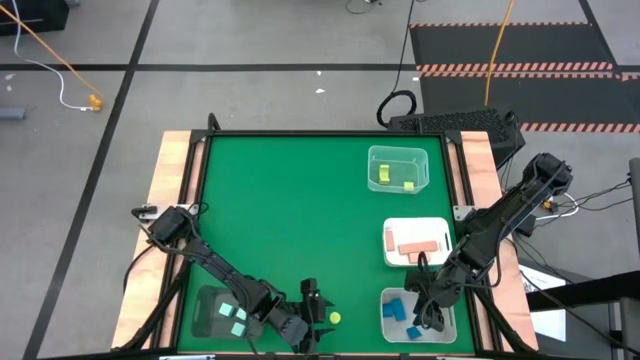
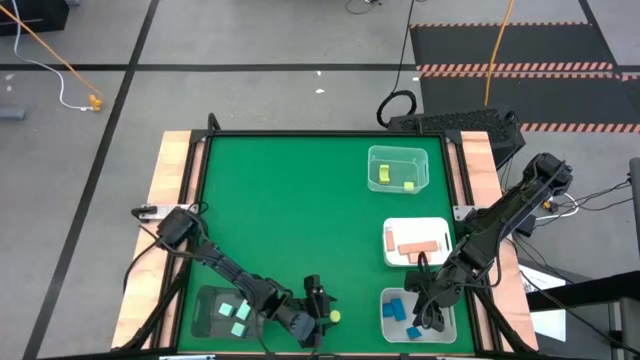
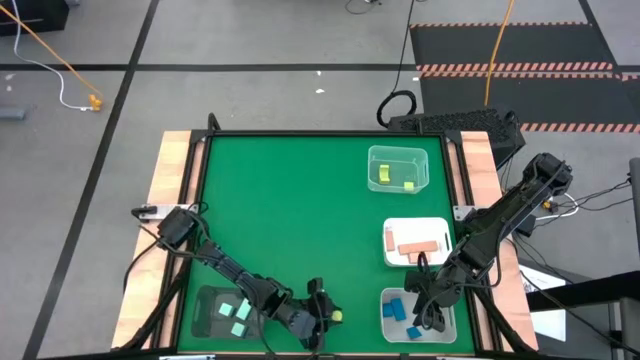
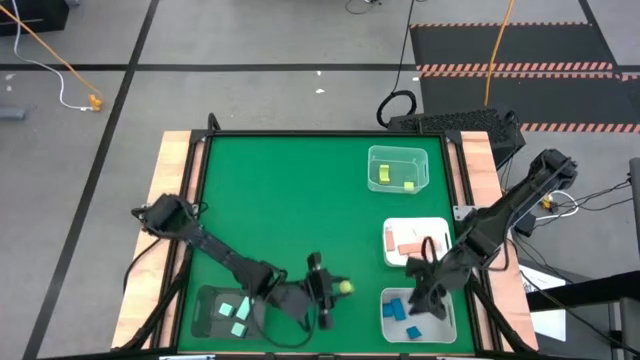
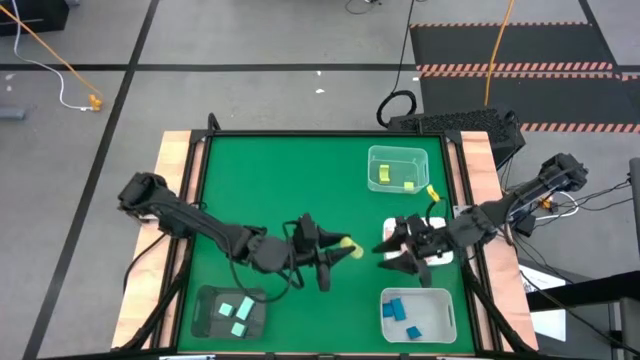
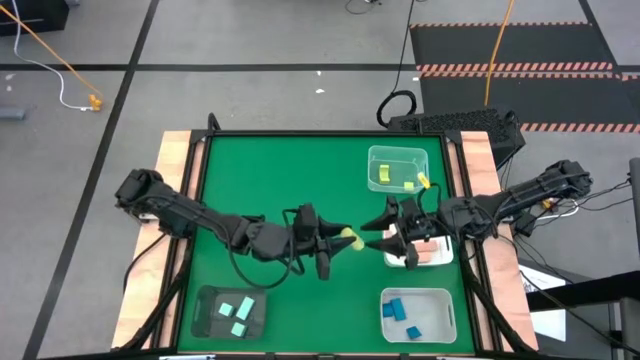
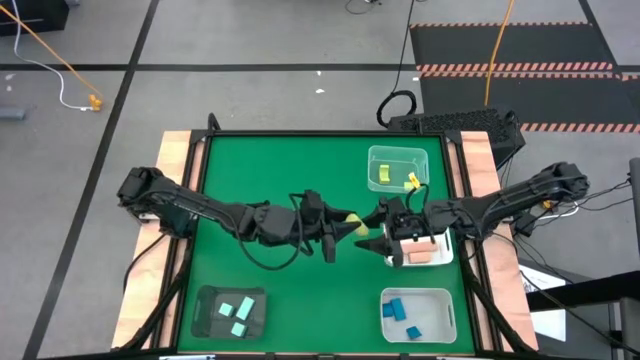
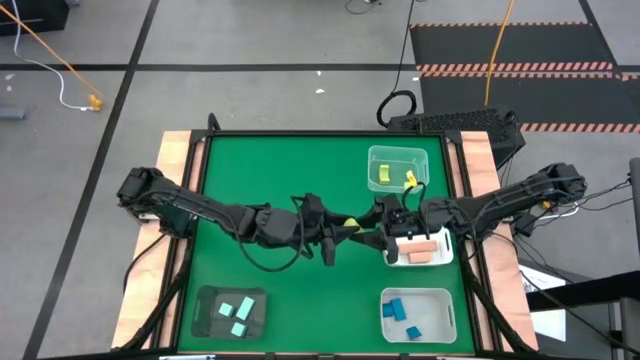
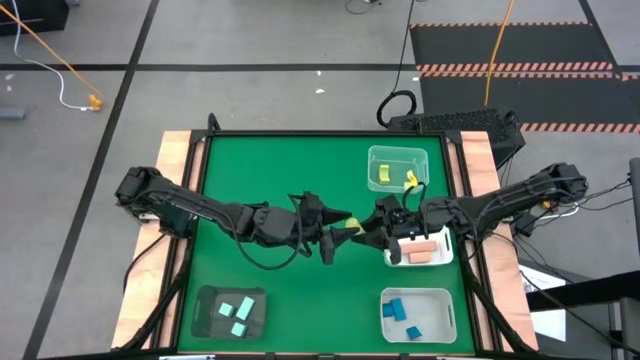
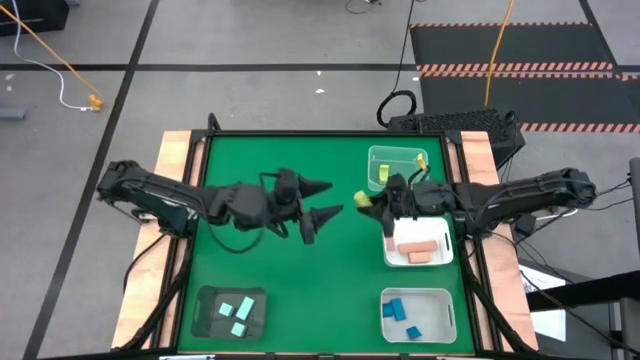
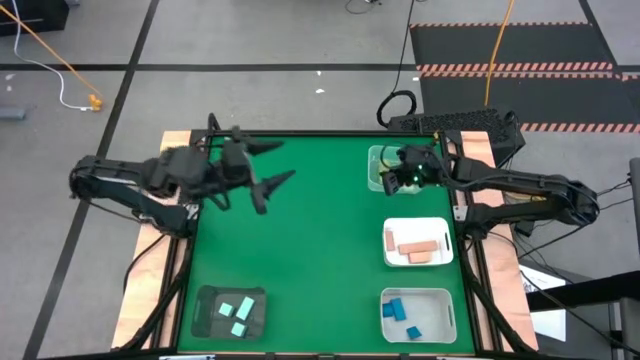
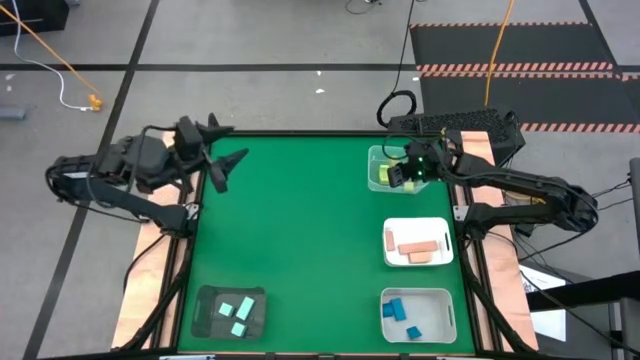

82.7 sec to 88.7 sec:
Task: Sort & place blocks by color
Put the yellow block into the transparent bin

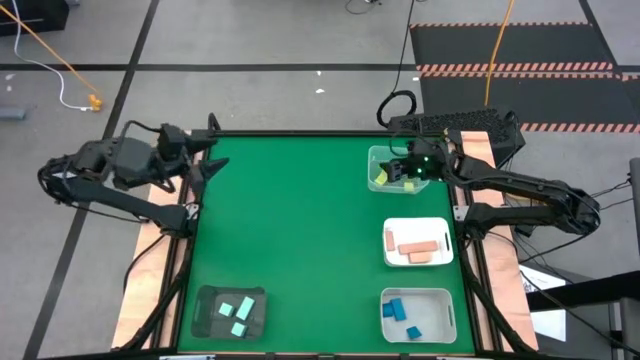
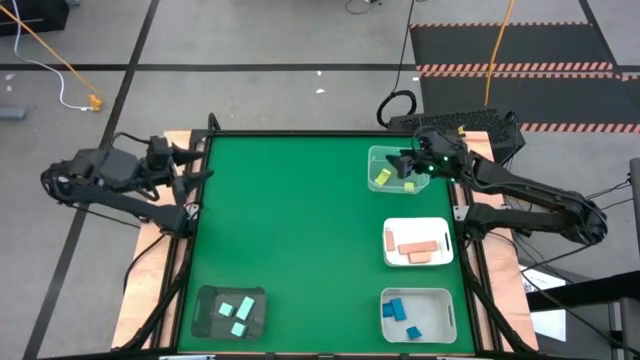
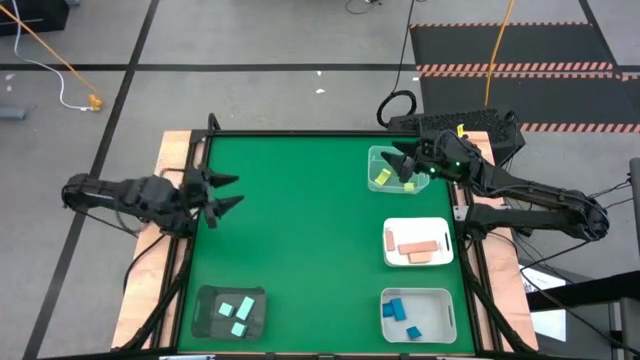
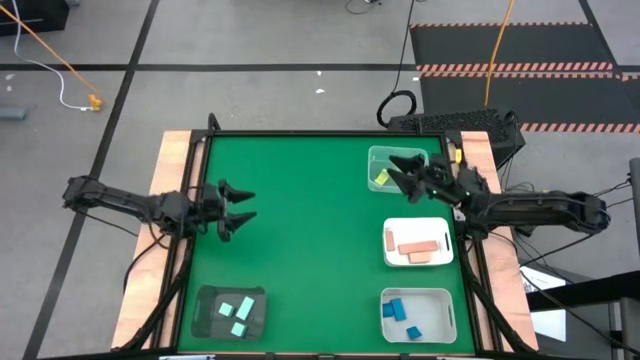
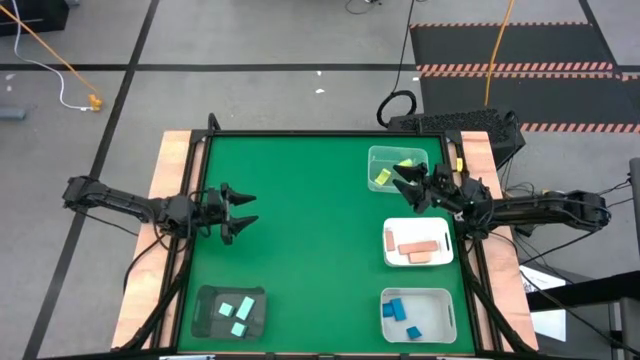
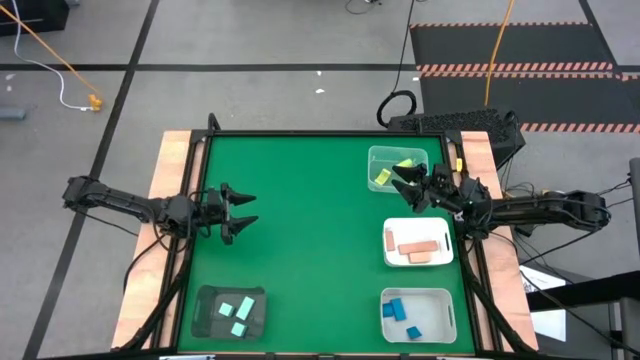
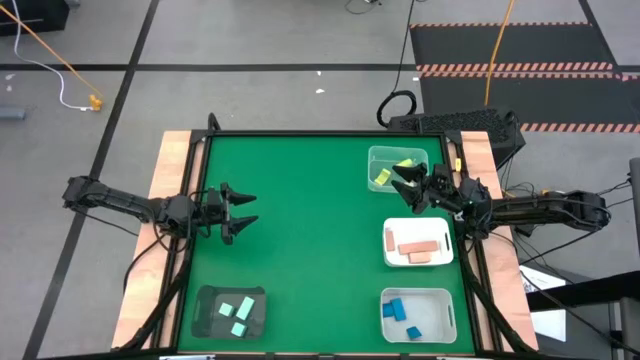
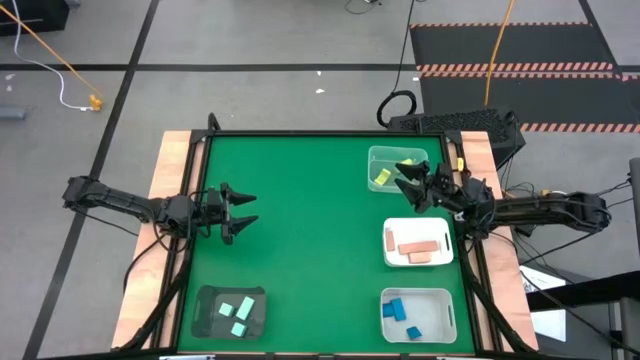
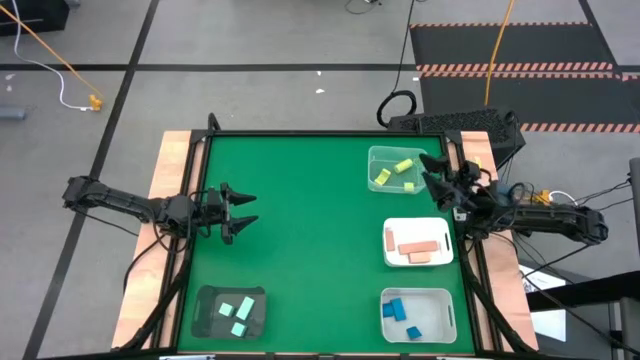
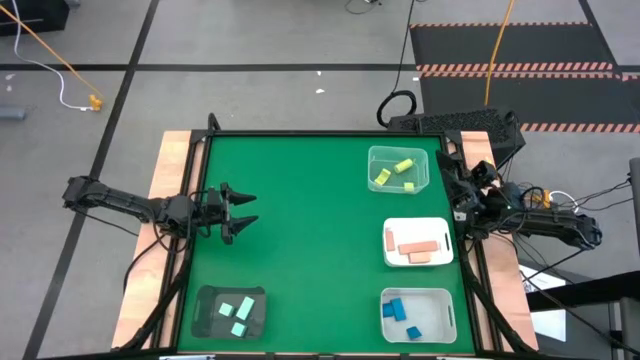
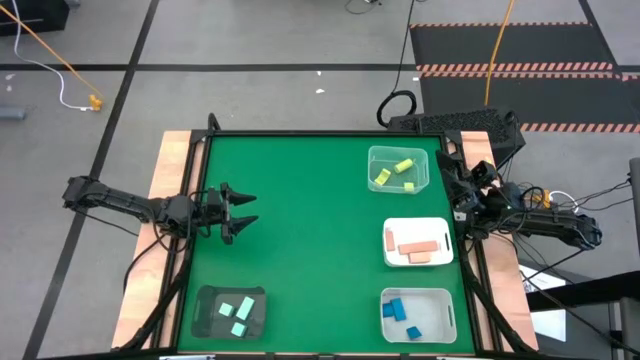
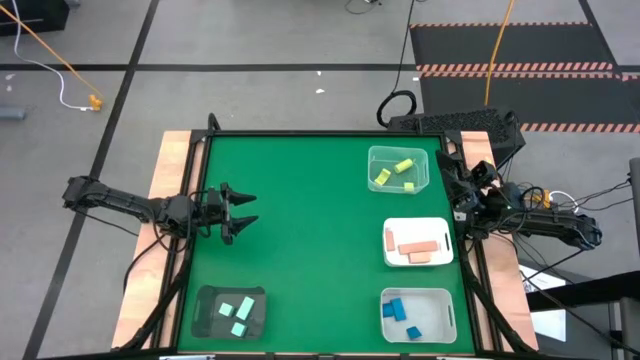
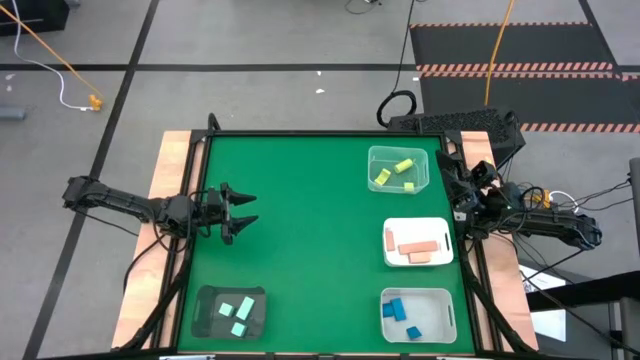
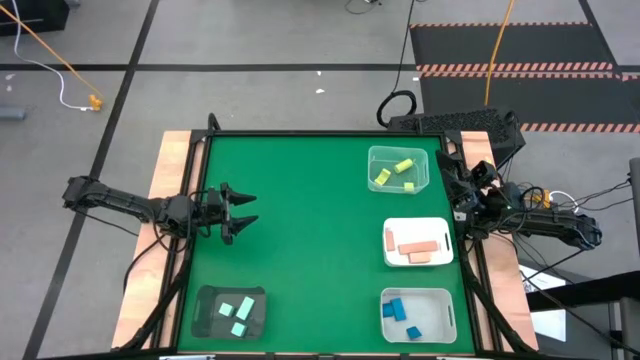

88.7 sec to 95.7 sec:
Return to Home Position

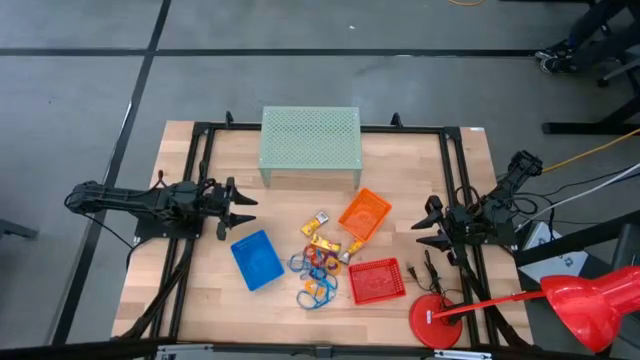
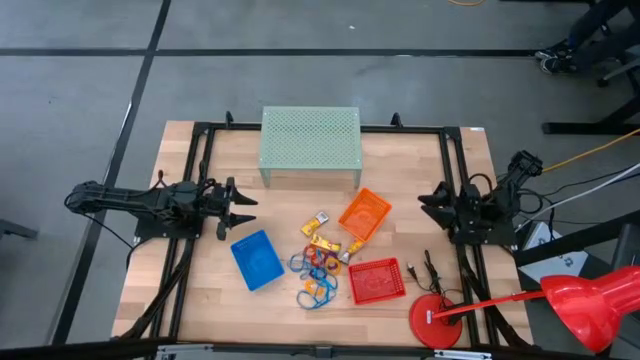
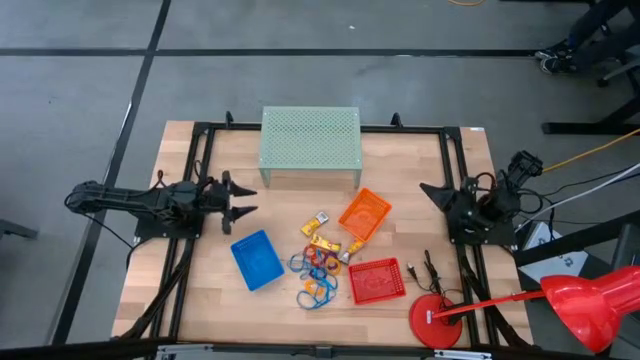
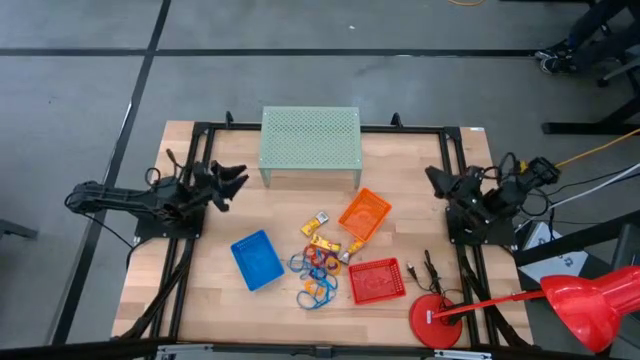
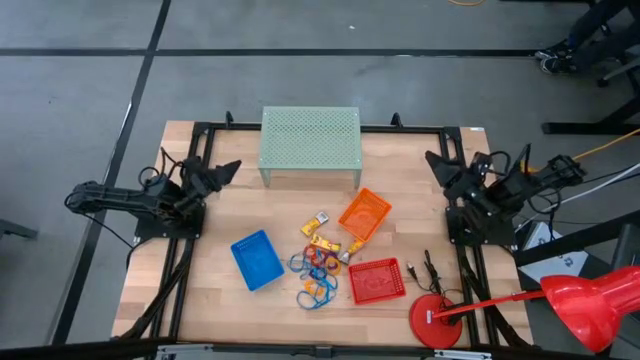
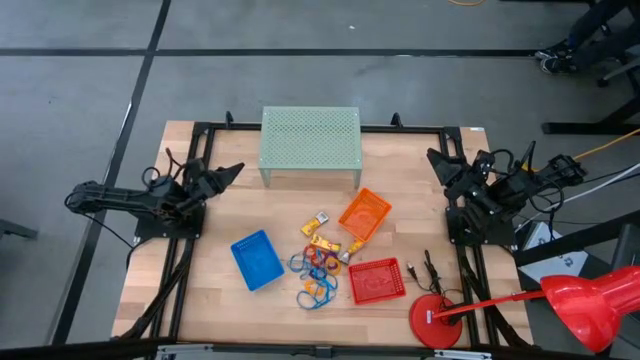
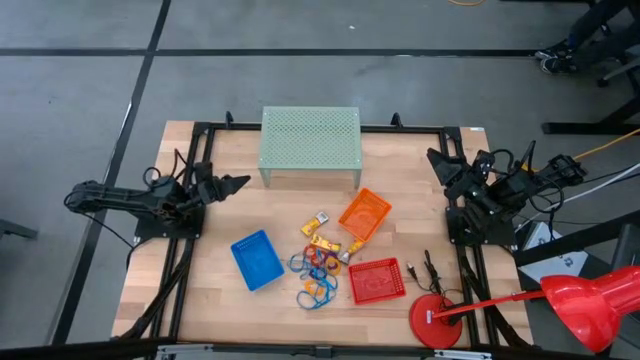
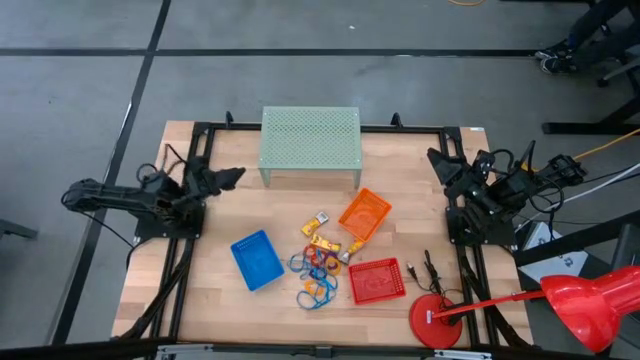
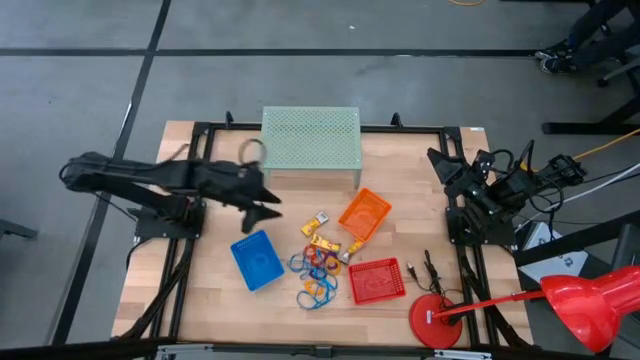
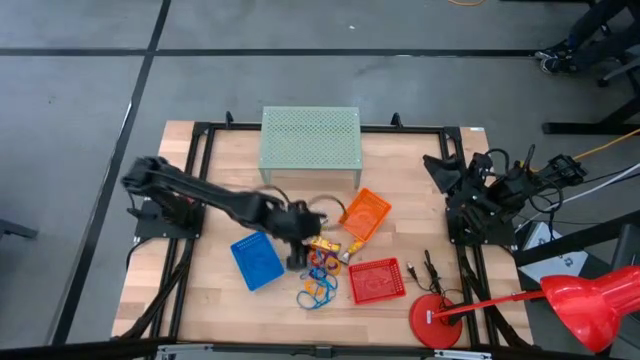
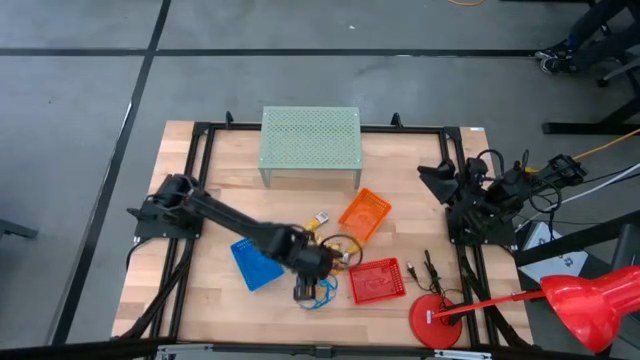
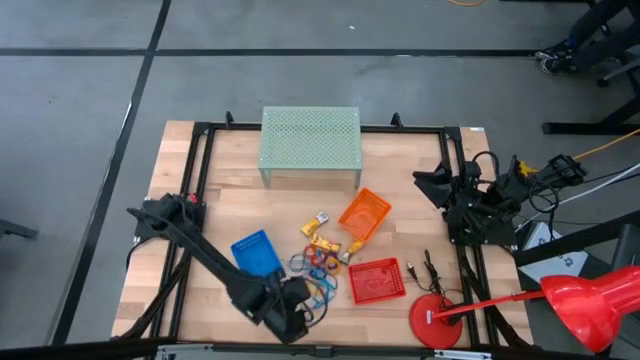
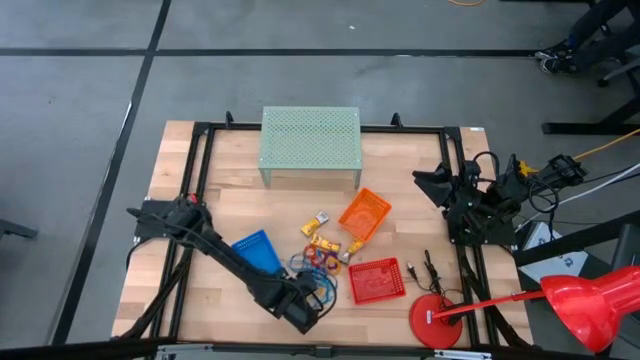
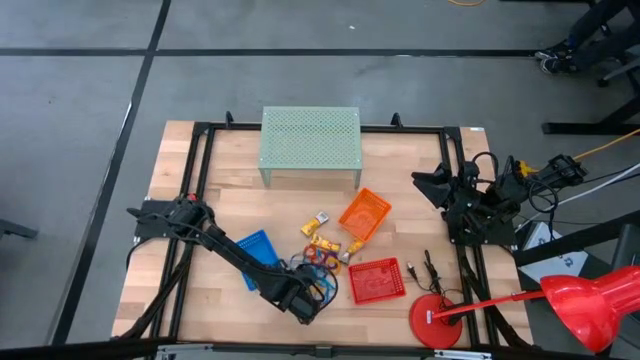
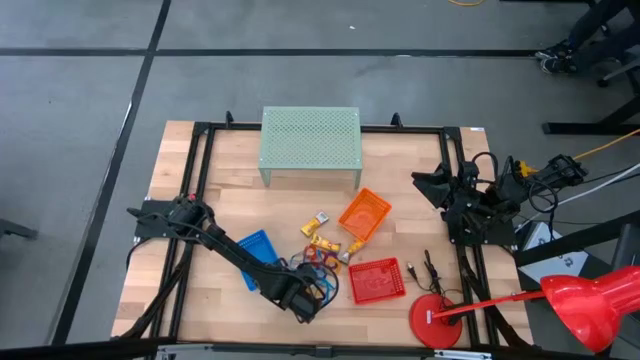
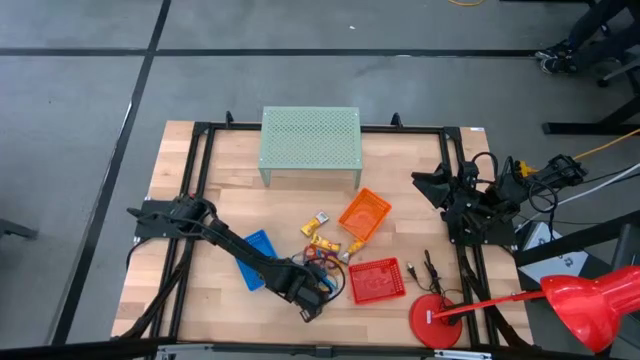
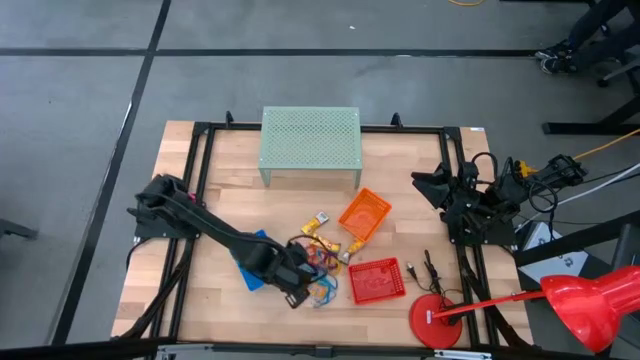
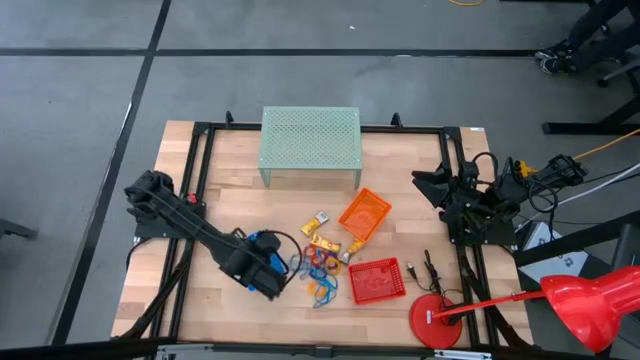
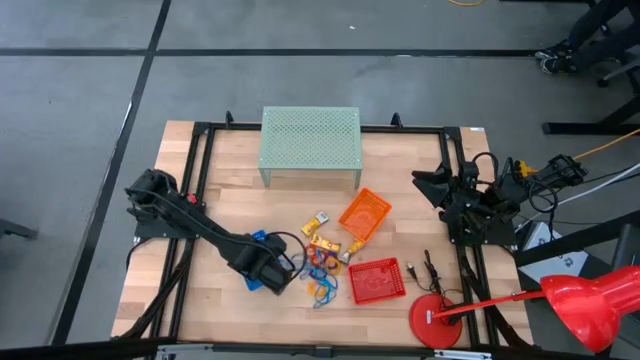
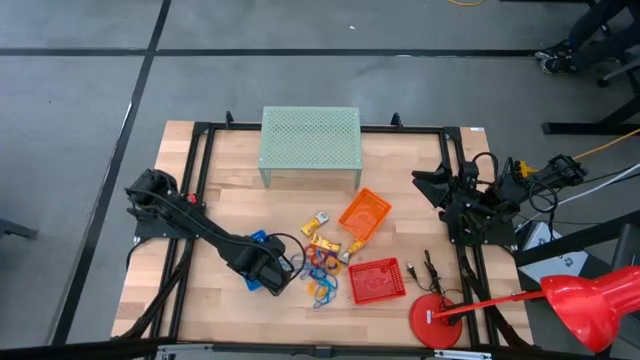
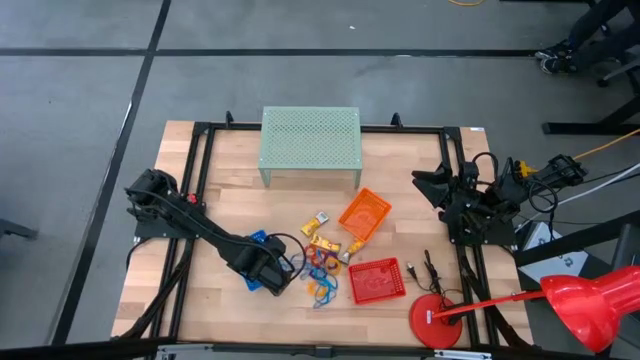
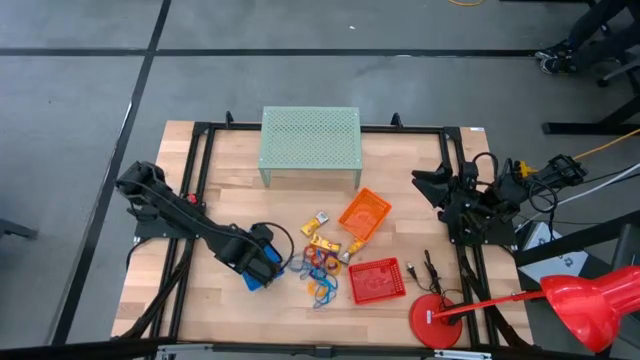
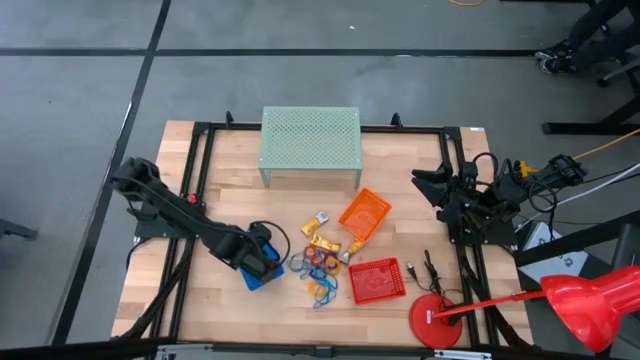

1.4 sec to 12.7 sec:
Task: Pick & Place Office Desk Supplies
Put the blue rubberband into the blue bin
